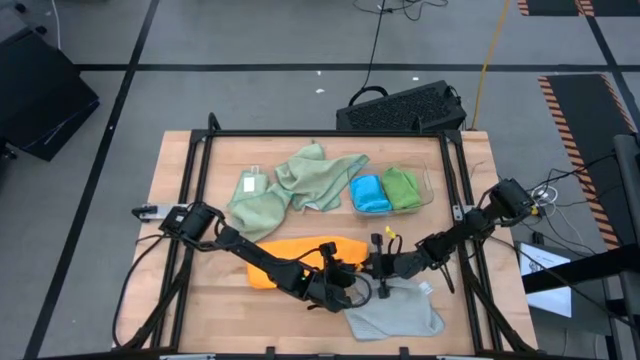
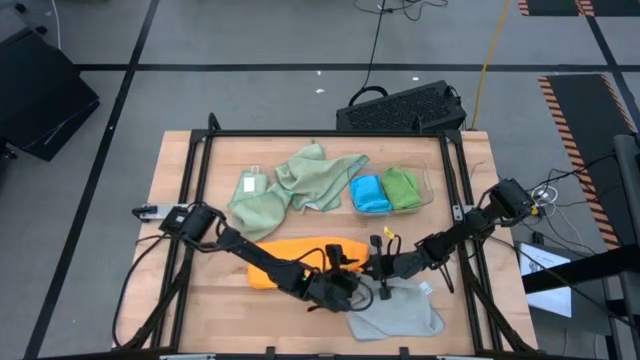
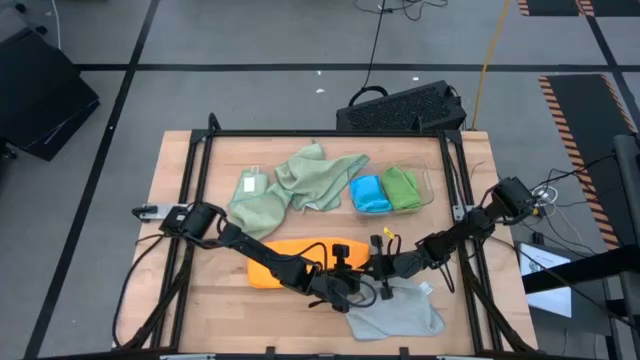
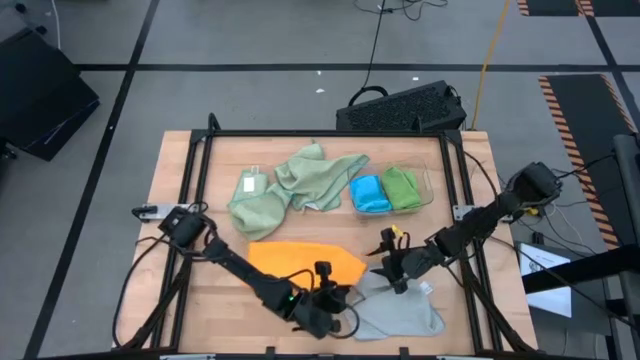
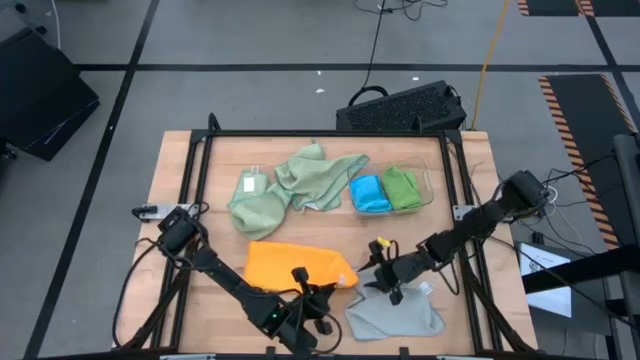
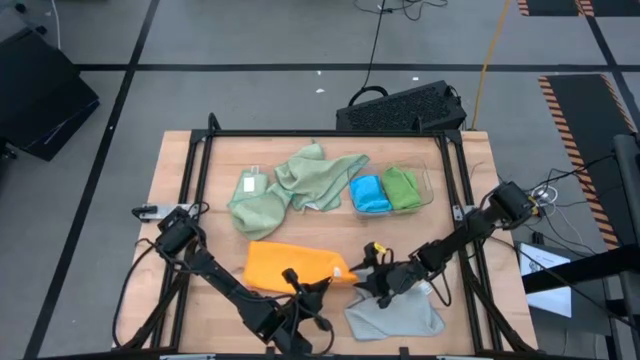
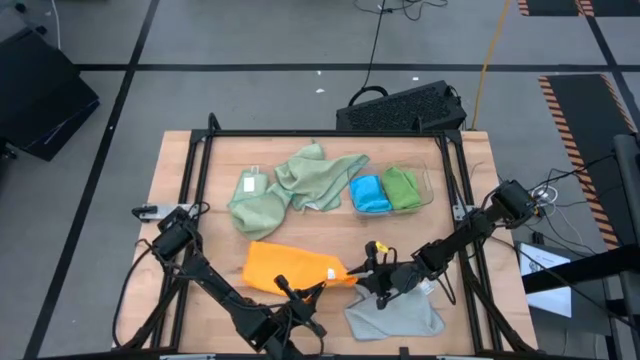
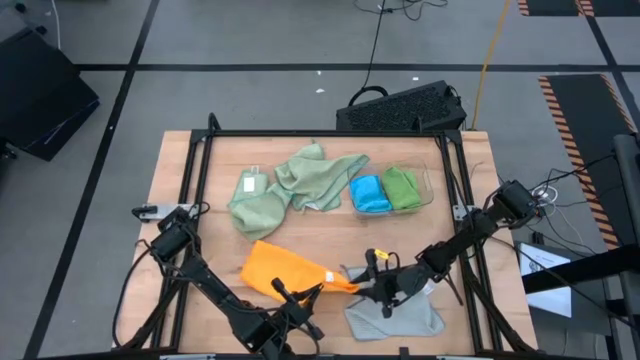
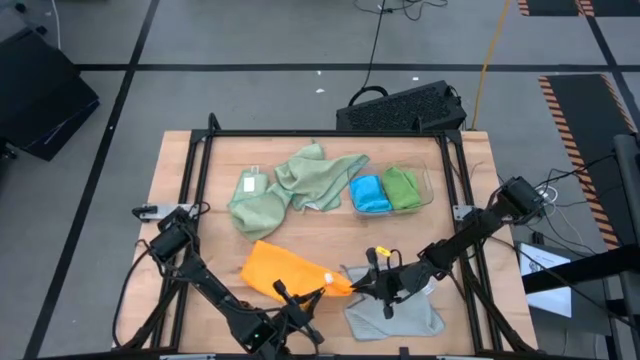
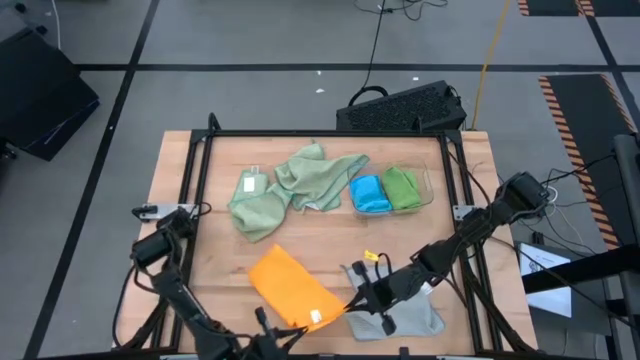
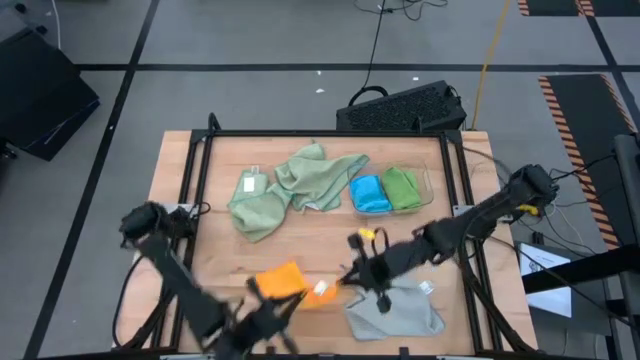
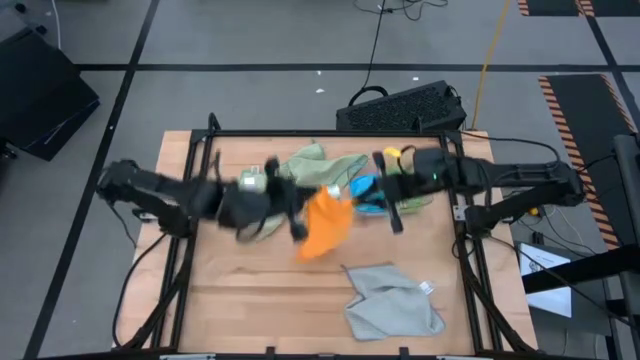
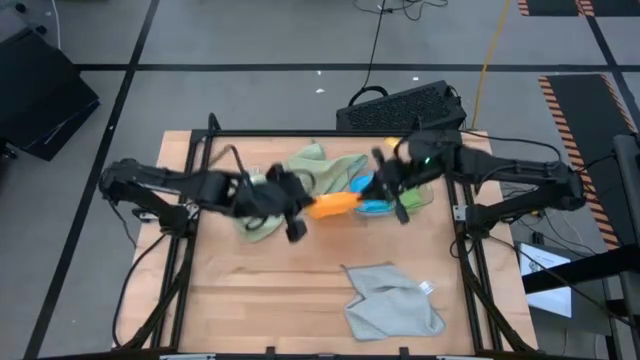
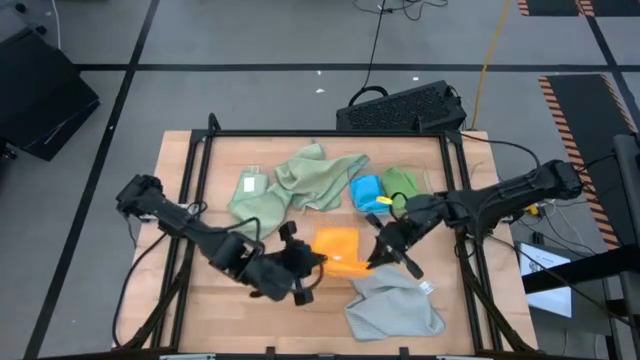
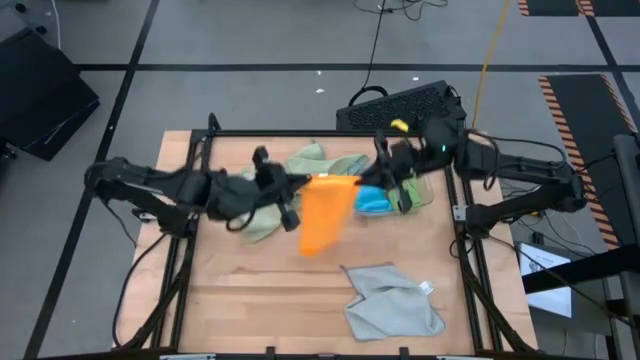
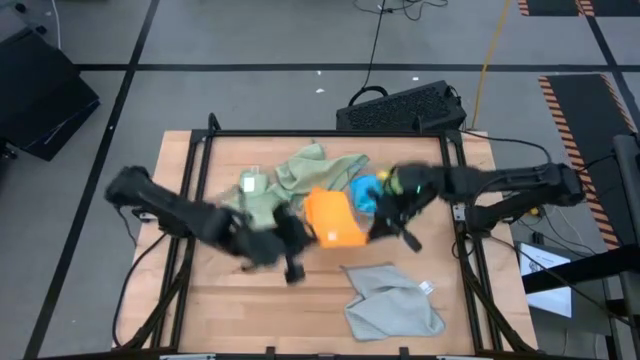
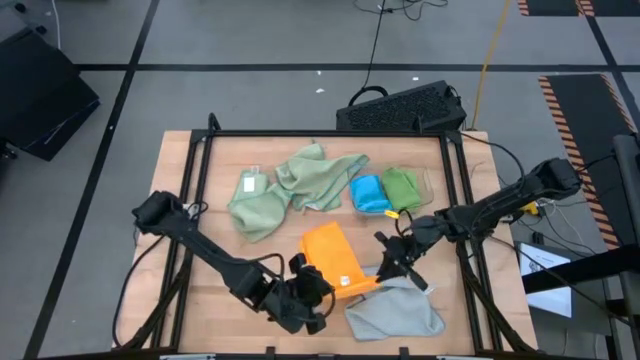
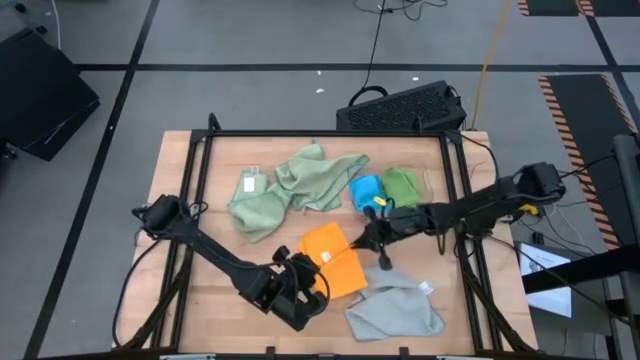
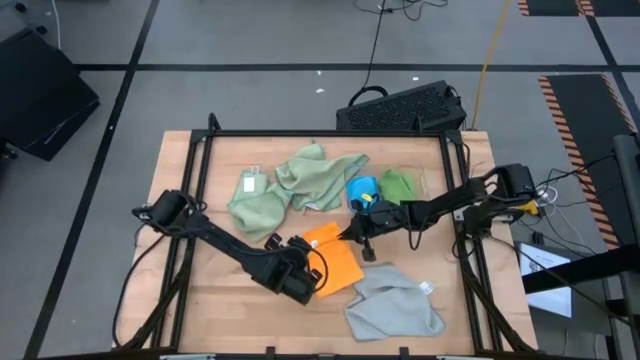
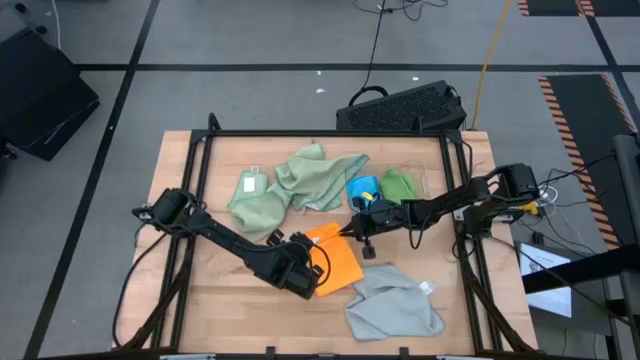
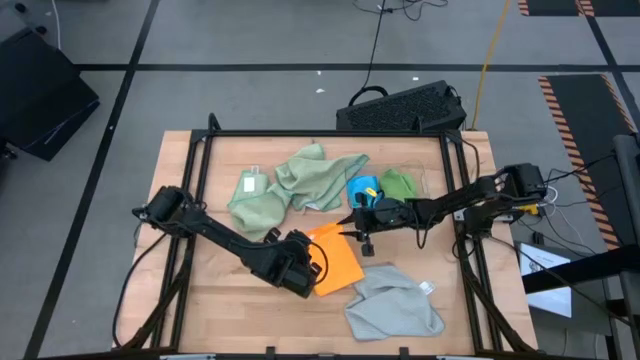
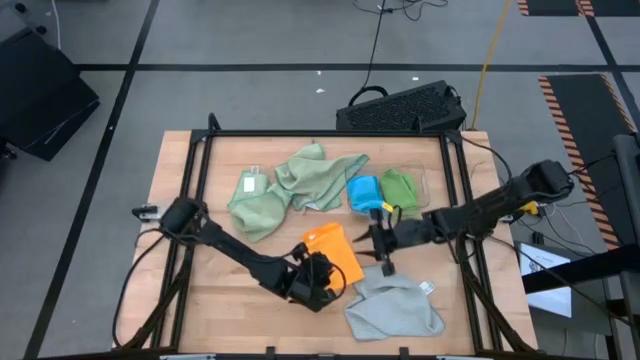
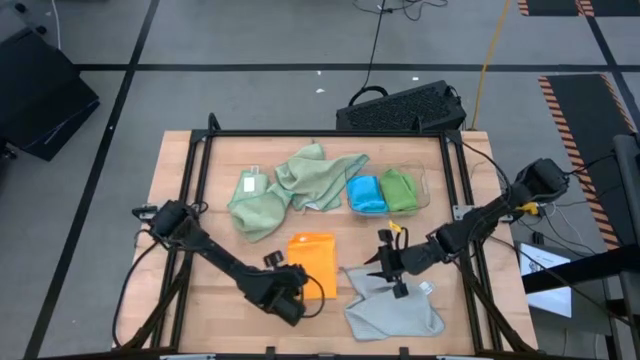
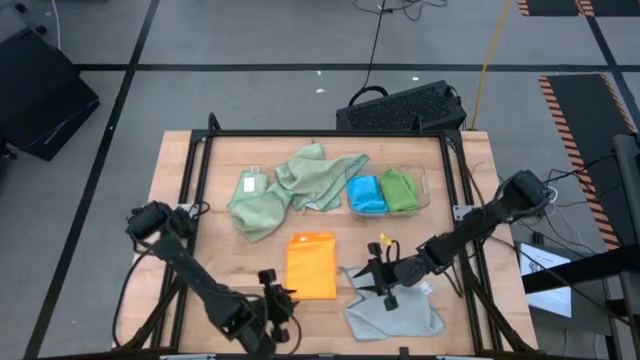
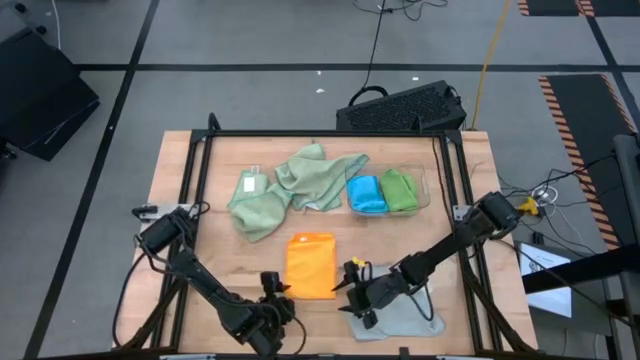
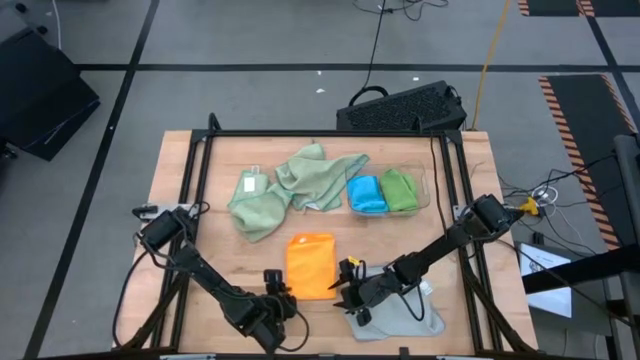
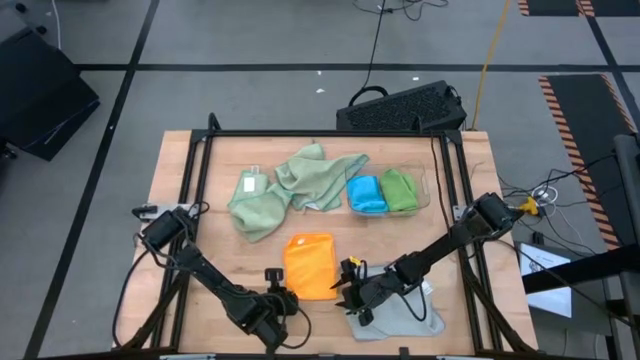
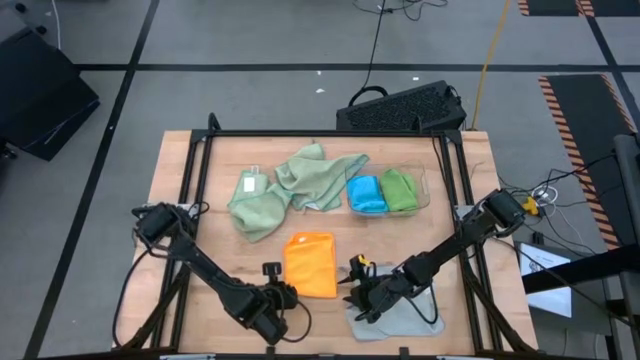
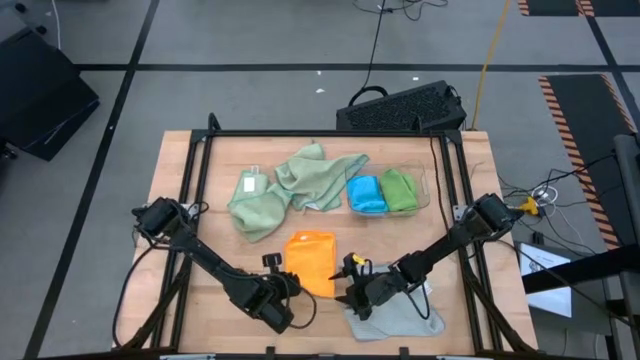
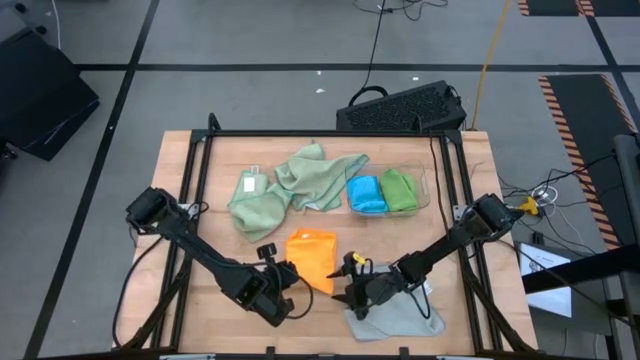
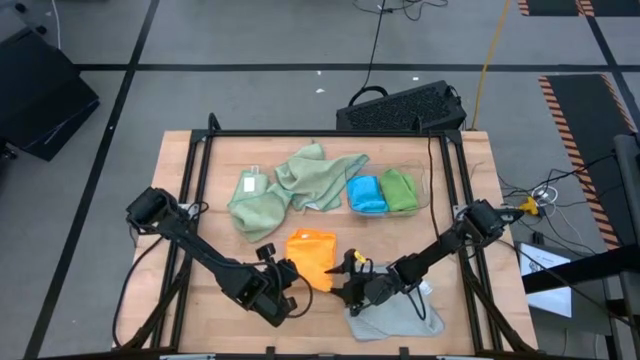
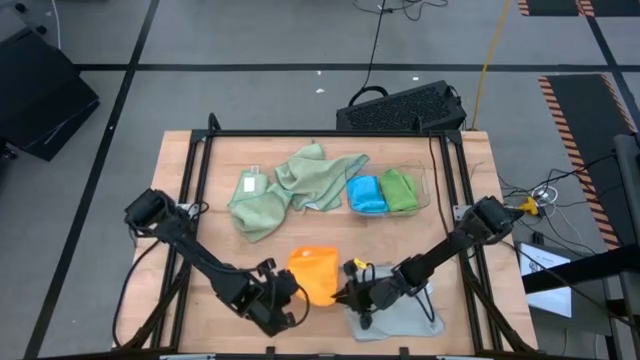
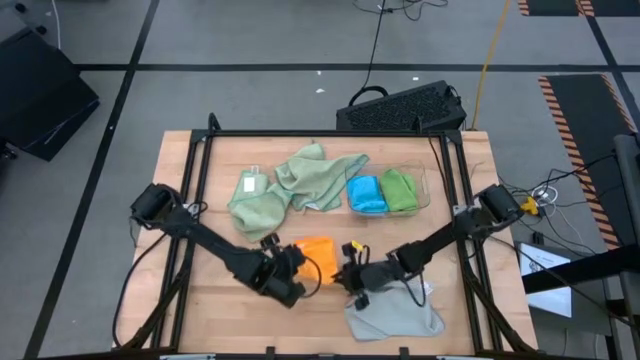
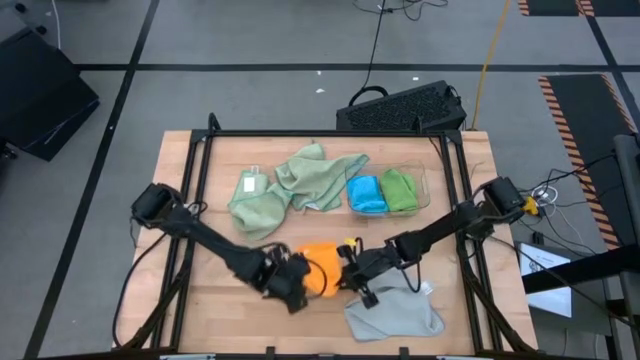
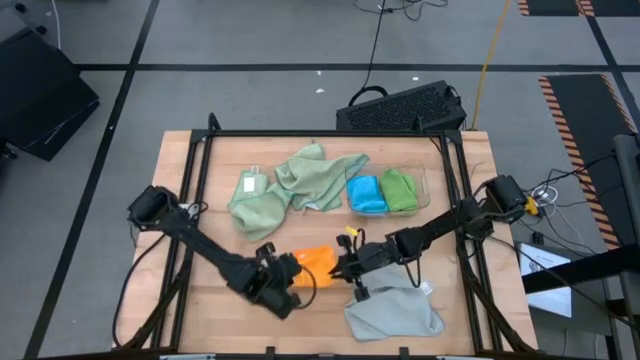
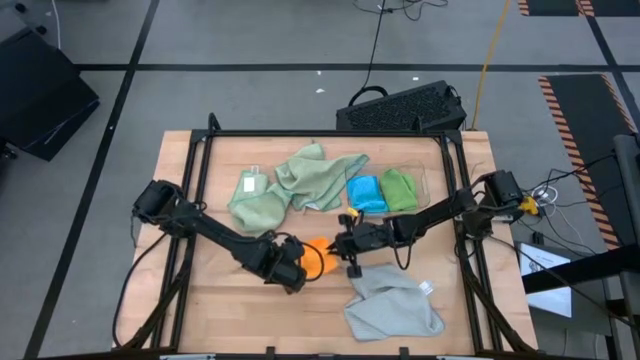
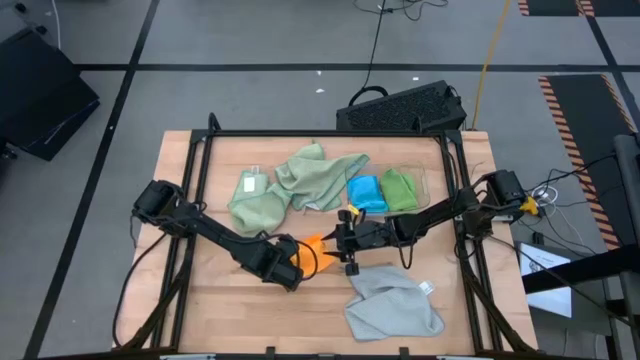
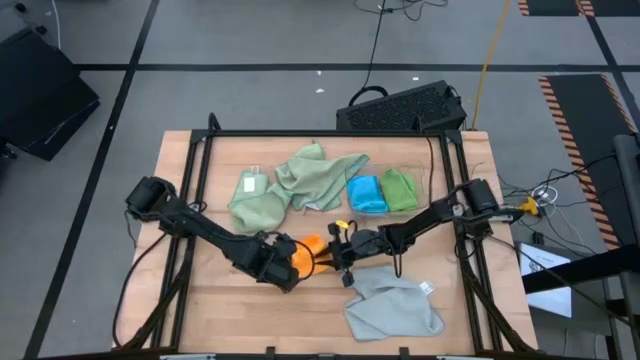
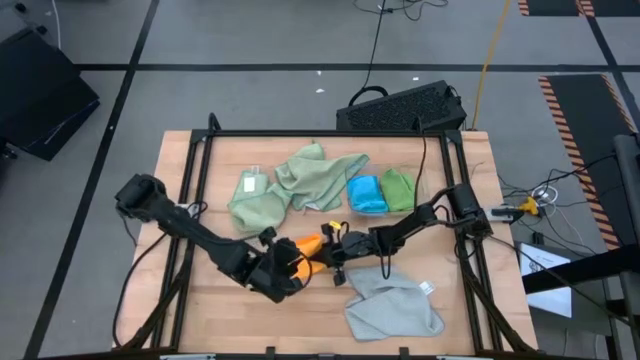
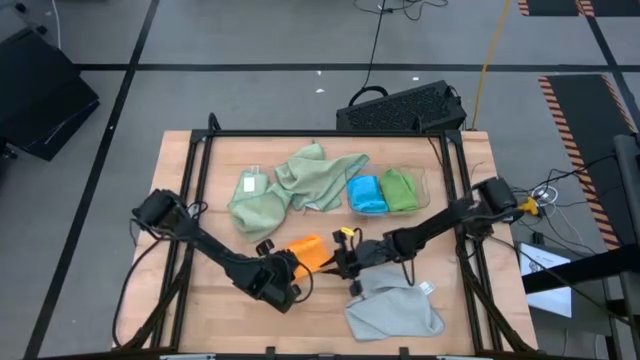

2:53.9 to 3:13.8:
Task: Fold microfiber towels
Fold the yellow microfiber cloth

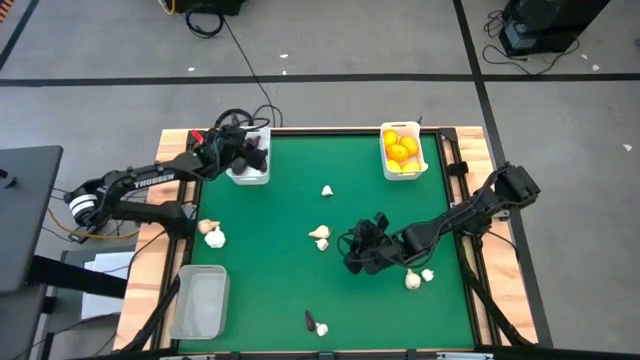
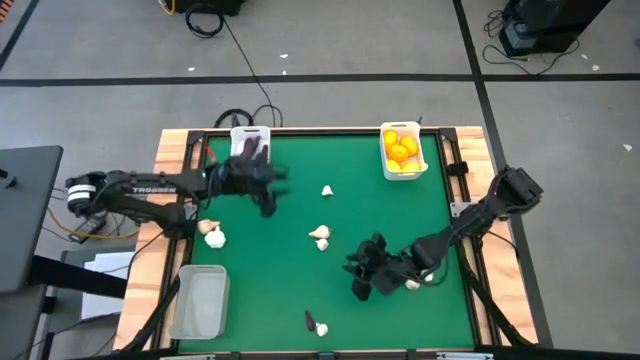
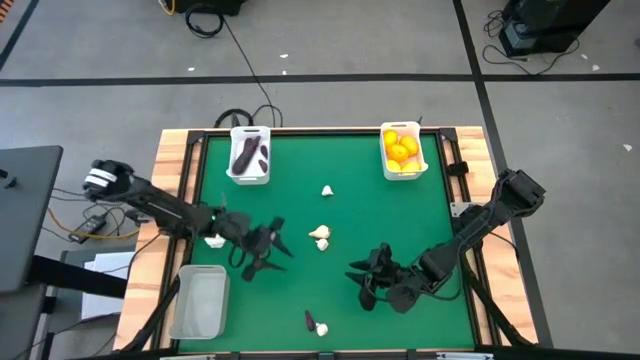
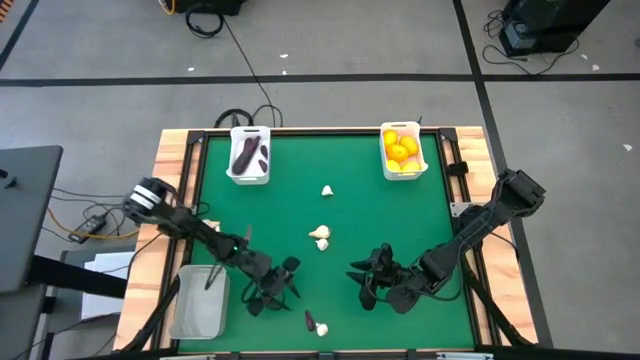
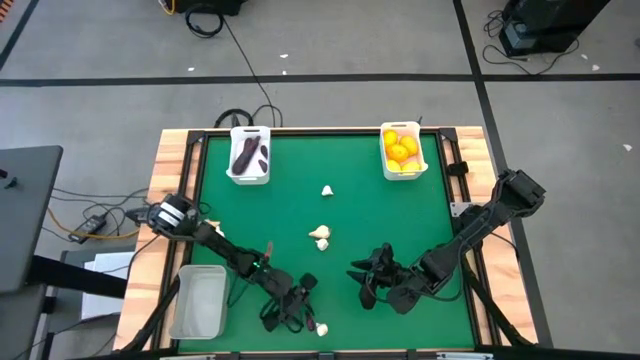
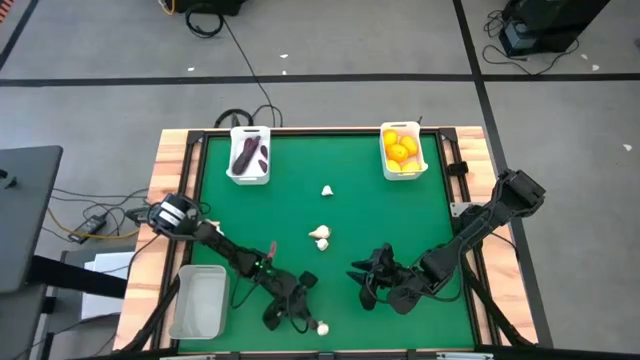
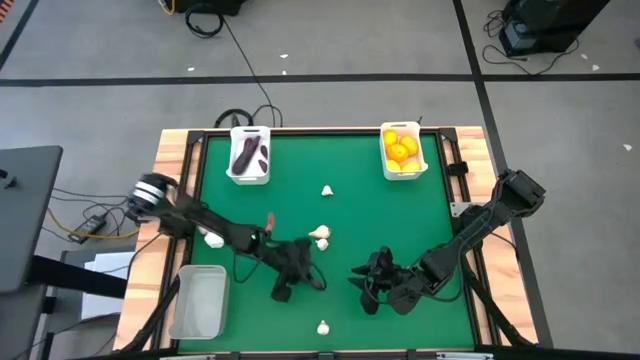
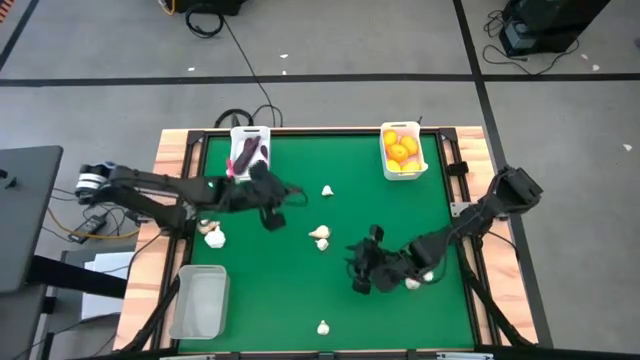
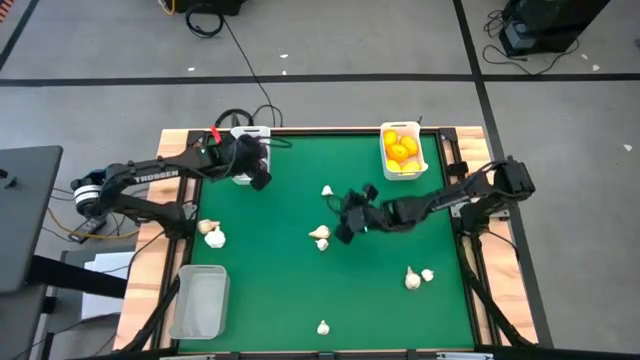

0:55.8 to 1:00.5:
Task: Sort produce into baskets
Put the eggplant into the left white bin
